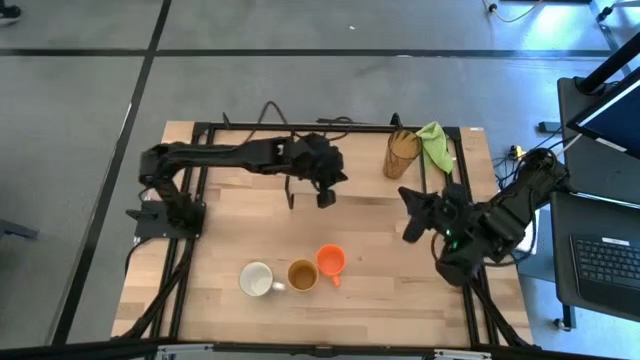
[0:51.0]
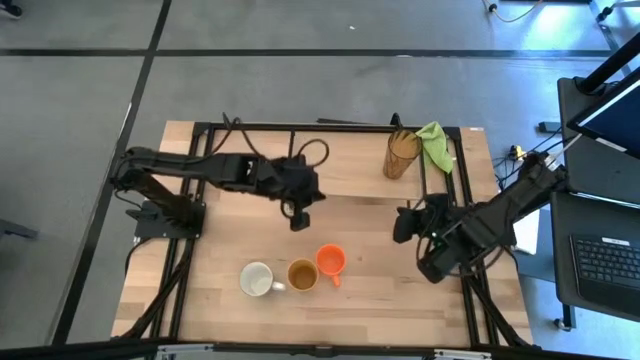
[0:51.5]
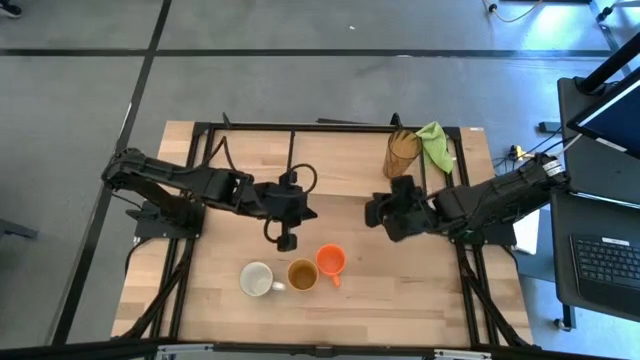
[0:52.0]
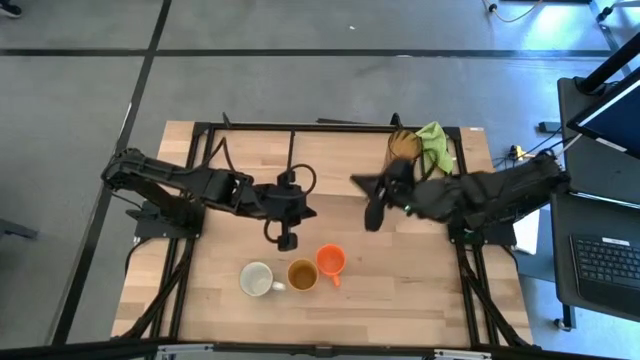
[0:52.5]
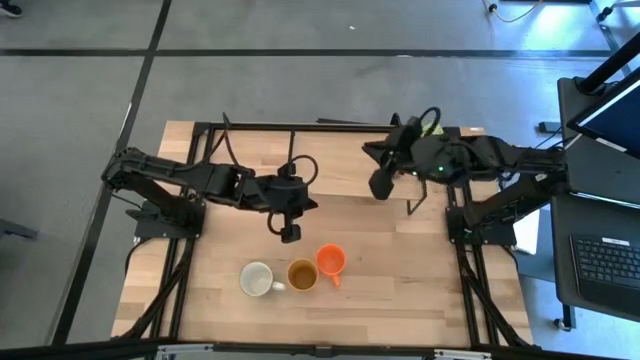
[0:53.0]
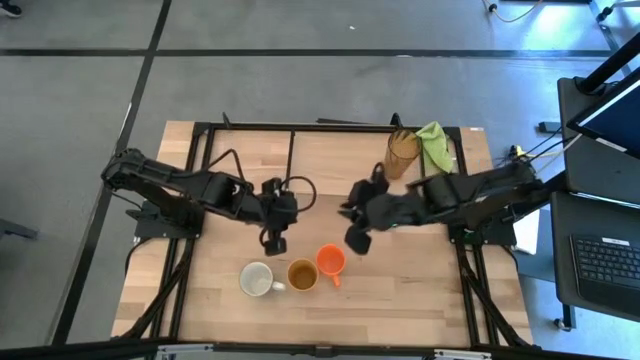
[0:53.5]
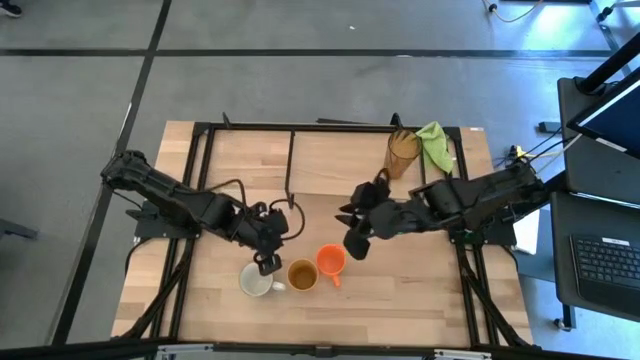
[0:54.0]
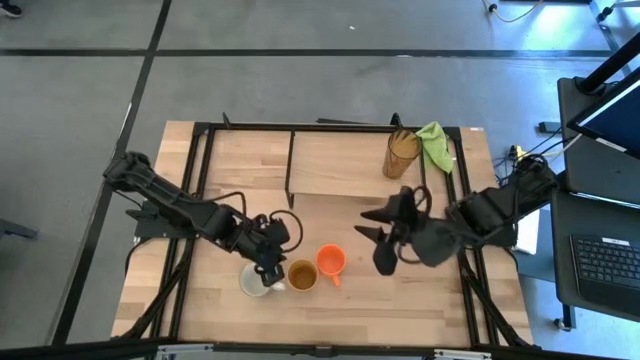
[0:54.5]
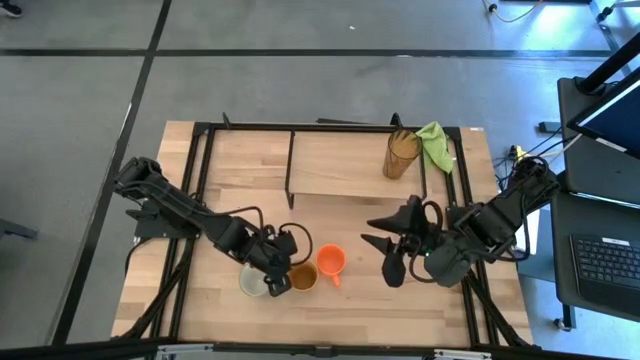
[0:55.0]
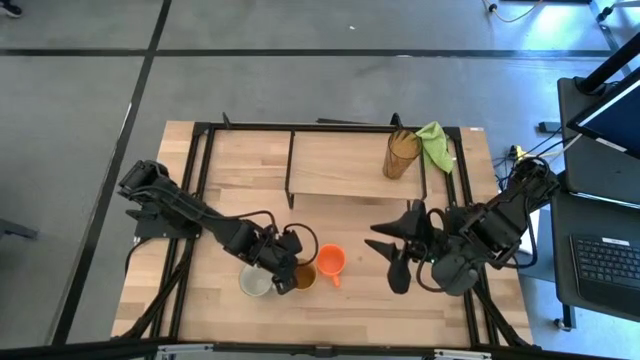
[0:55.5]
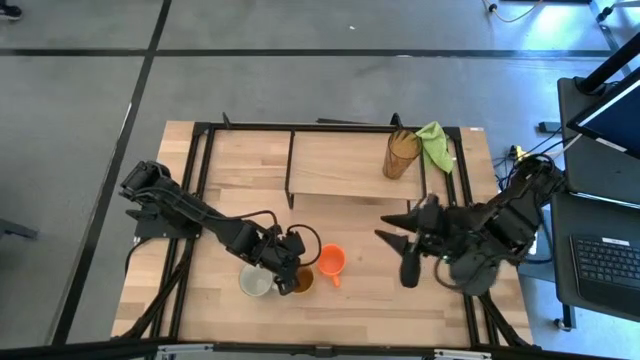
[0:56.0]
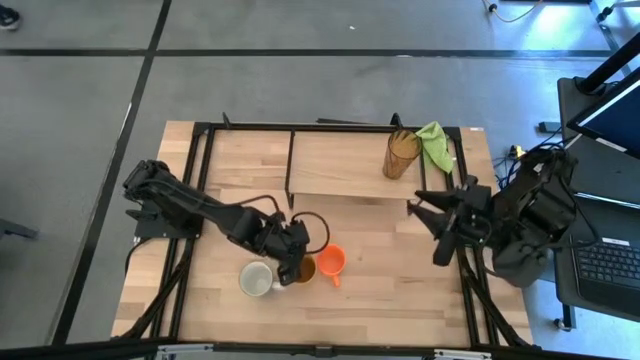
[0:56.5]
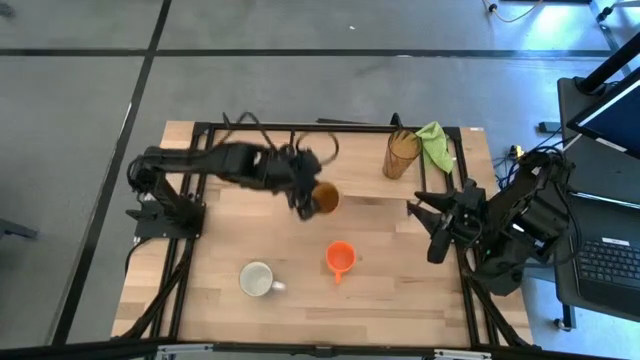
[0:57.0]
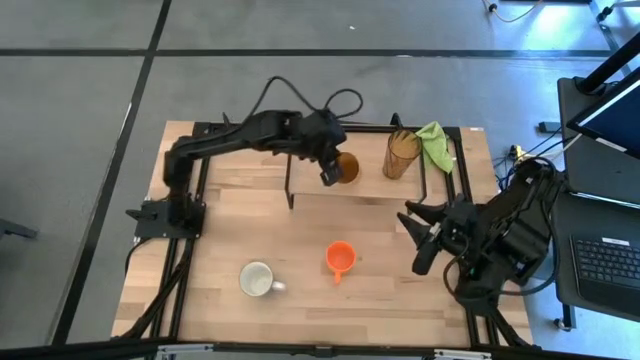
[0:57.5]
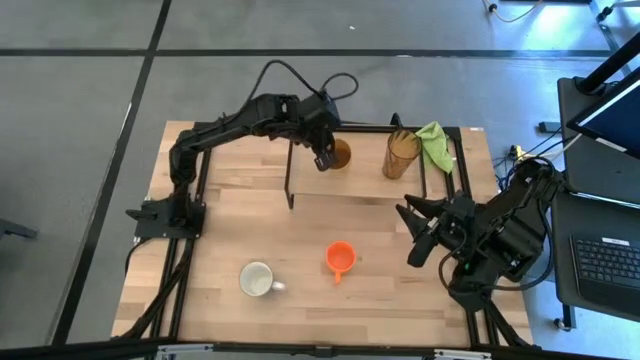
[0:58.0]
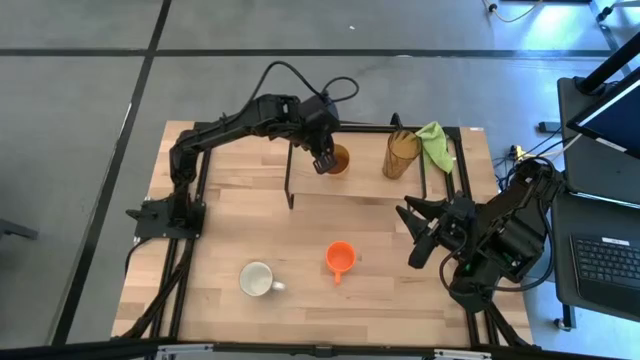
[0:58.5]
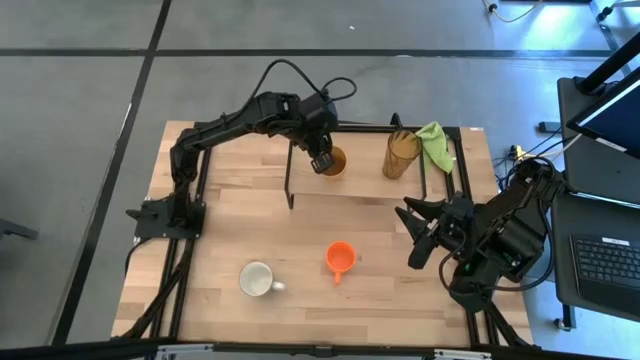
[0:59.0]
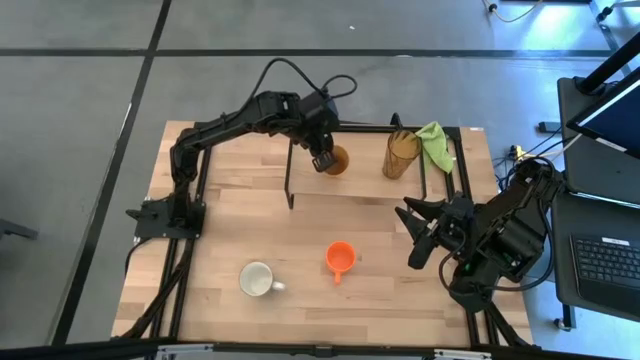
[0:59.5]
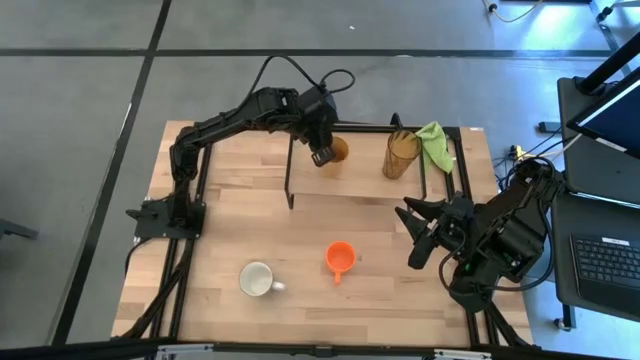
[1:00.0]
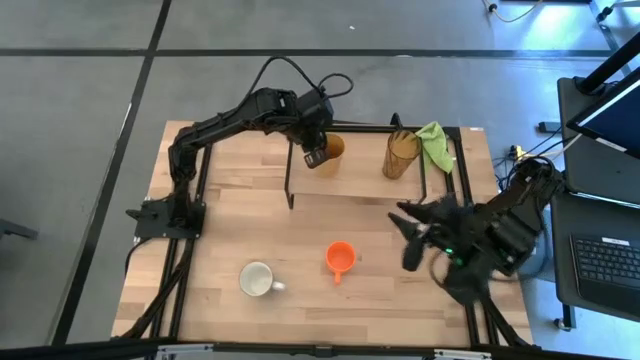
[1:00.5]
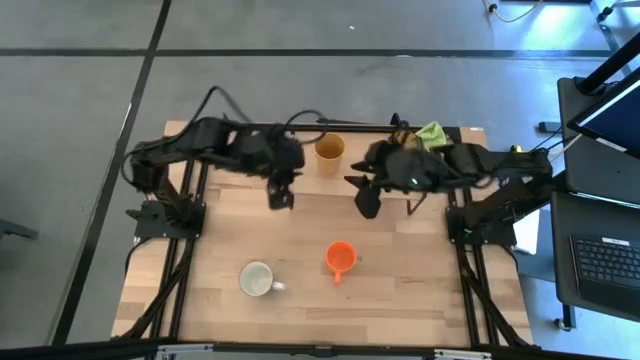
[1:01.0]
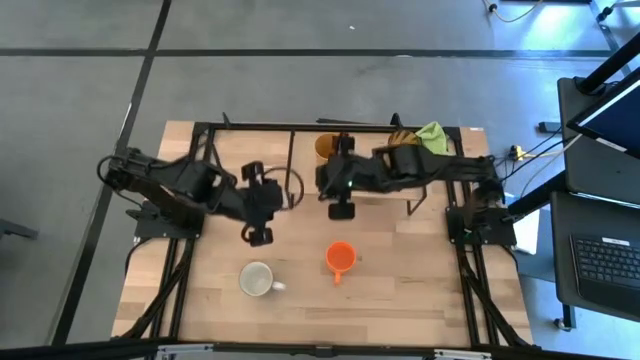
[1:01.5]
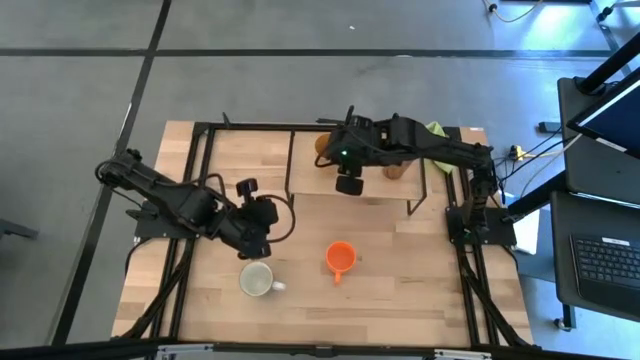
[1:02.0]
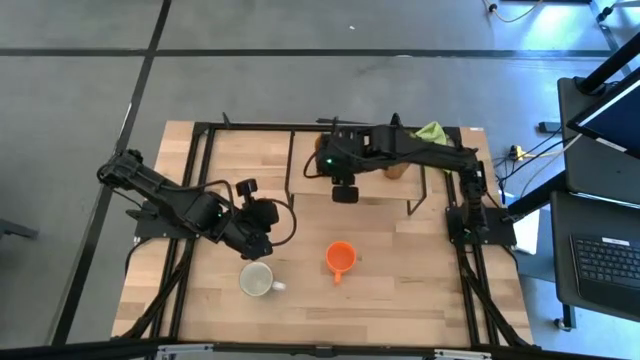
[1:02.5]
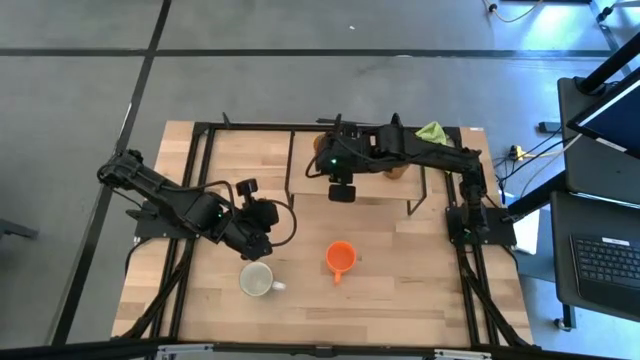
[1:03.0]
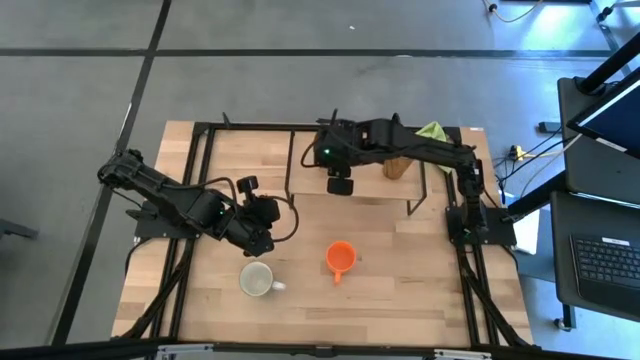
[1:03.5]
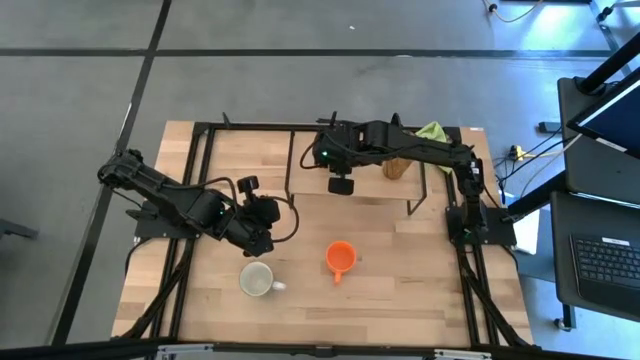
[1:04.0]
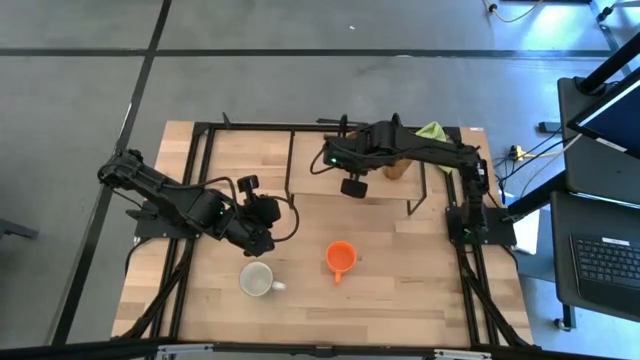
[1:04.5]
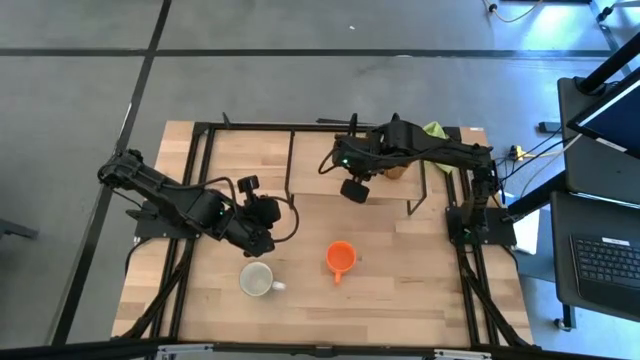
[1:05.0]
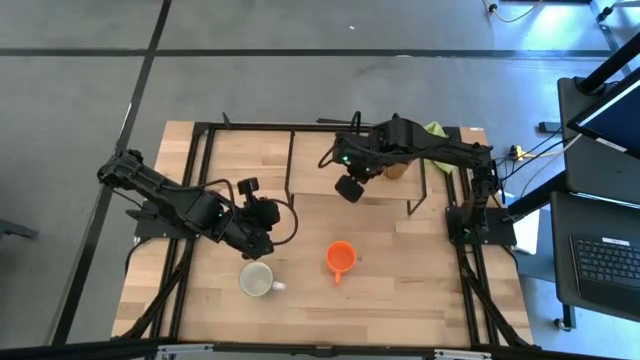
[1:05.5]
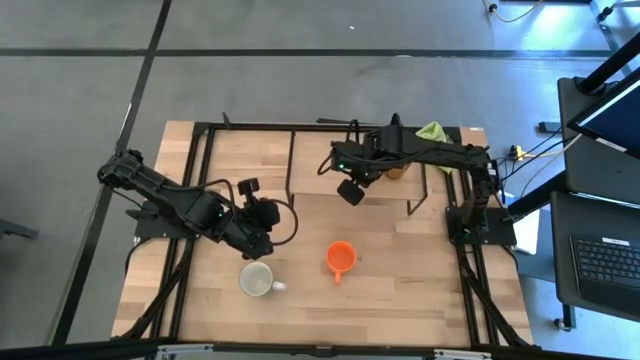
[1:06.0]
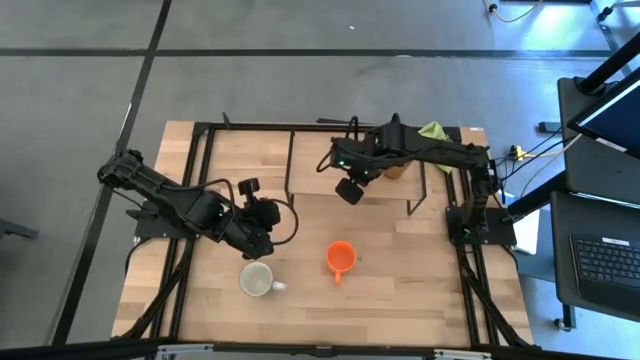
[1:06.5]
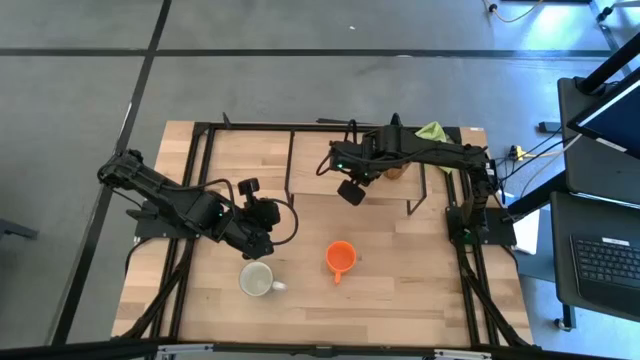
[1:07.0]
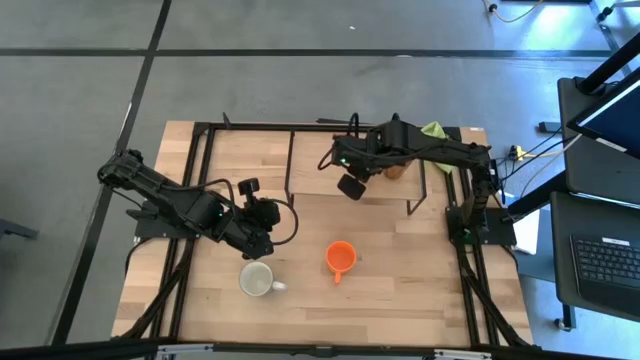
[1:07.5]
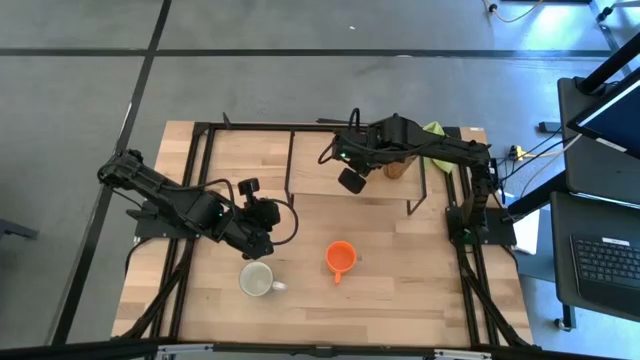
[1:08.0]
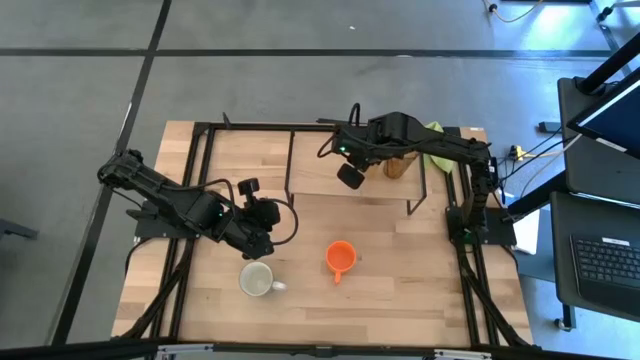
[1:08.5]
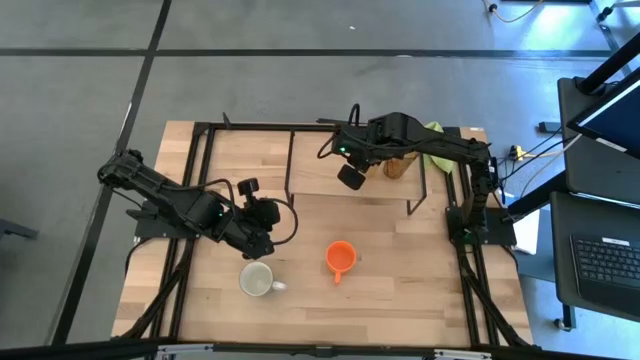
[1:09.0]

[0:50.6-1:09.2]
Task: Stack small to large cups/mugs on shelf
Put the yellow cup on the shelf

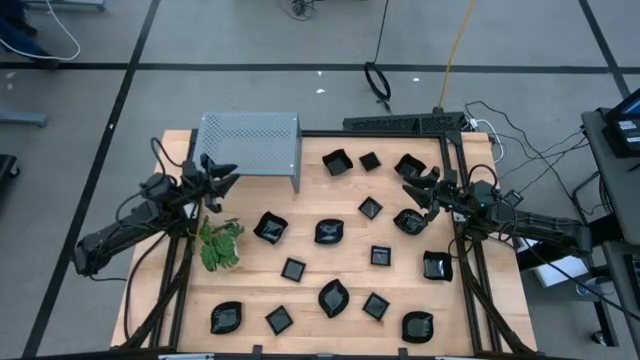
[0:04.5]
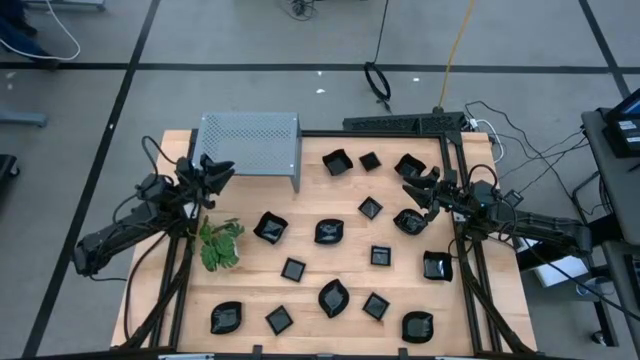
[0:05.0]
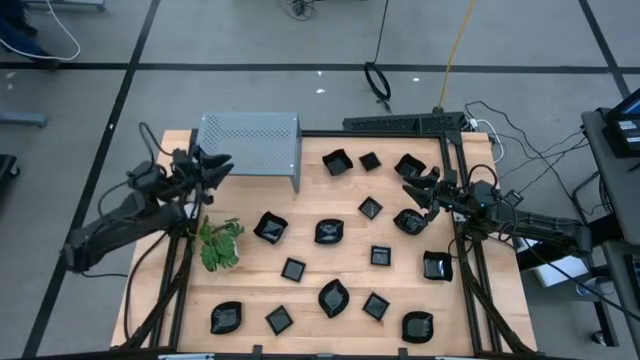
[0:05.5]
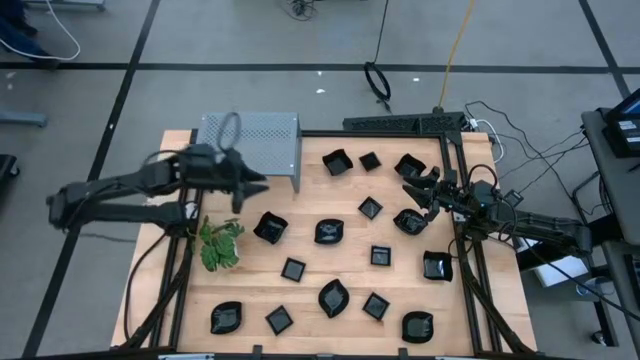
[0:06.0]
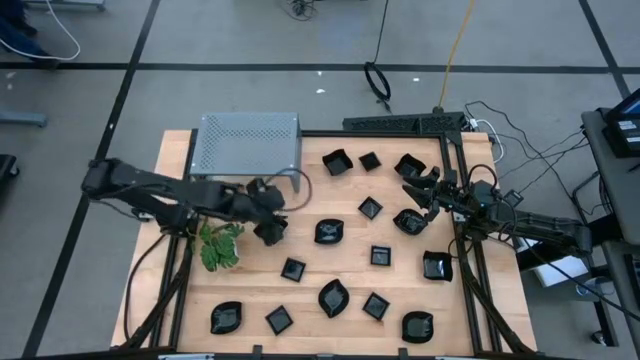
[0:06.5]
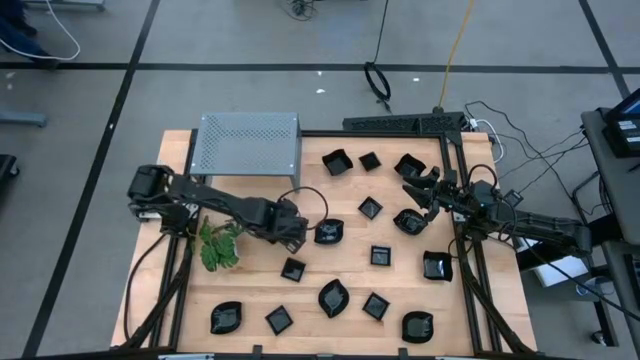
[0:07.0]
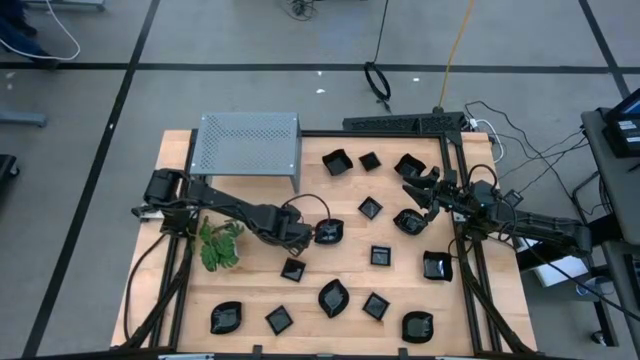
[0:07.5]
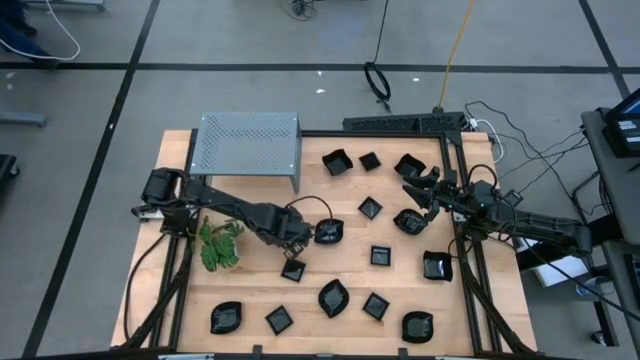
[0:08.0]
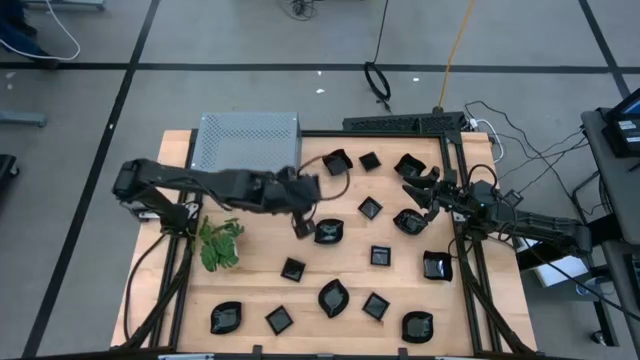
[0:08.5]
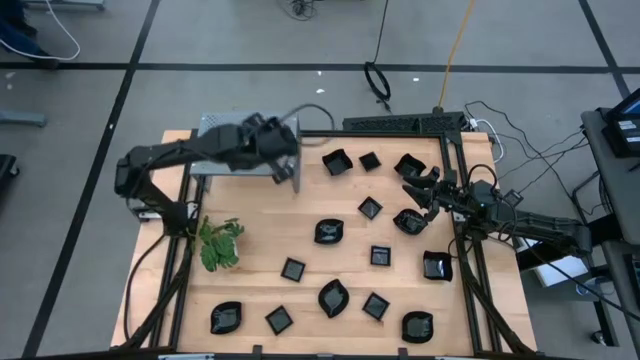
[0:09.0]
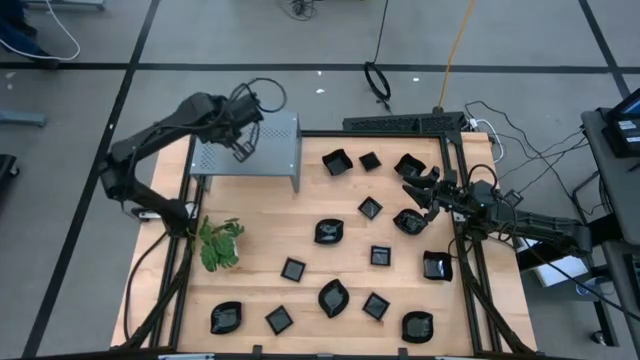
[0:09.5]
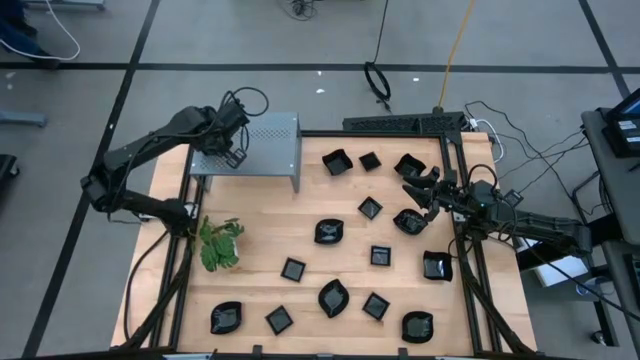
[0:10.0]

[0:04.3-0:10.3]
Task: Pick & Place Mini shaped plates
Put the distorted square plate on the shelf
